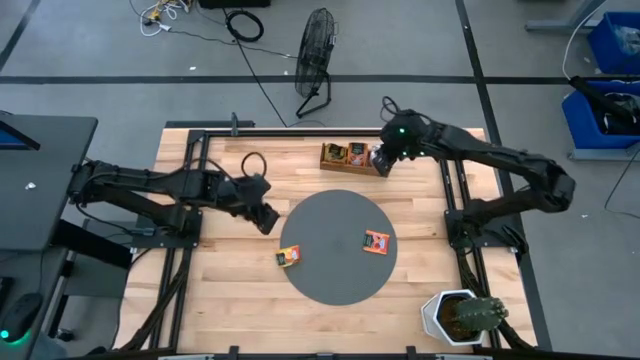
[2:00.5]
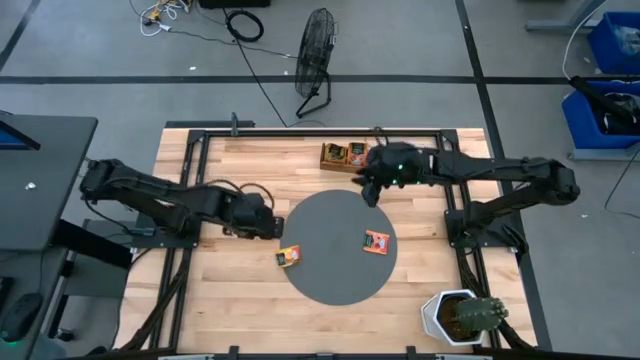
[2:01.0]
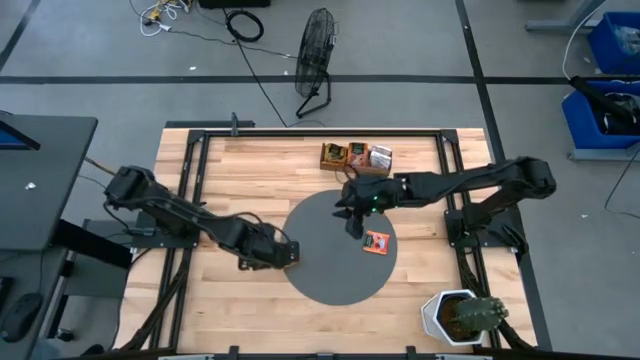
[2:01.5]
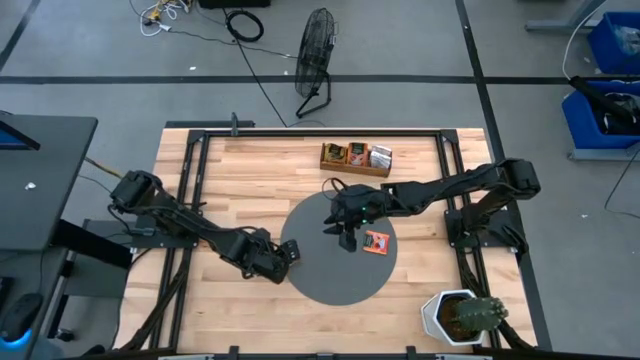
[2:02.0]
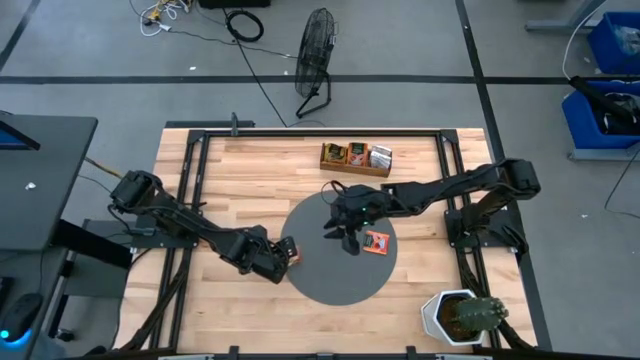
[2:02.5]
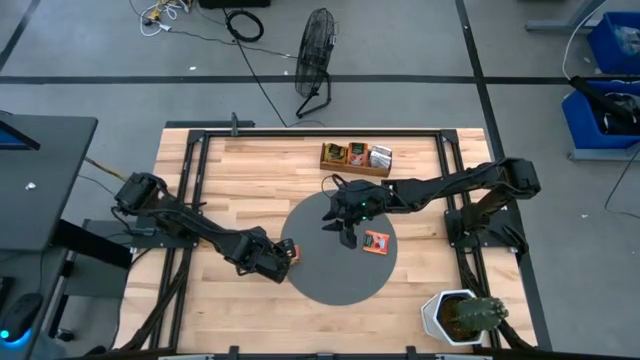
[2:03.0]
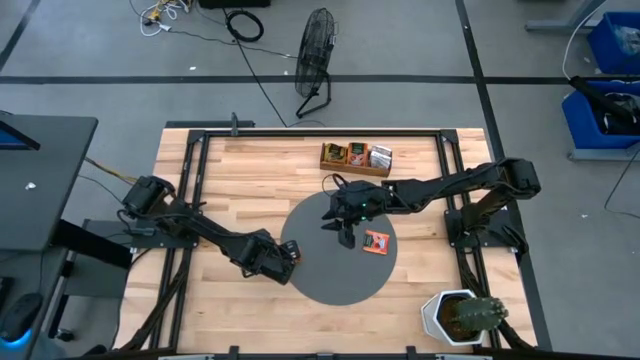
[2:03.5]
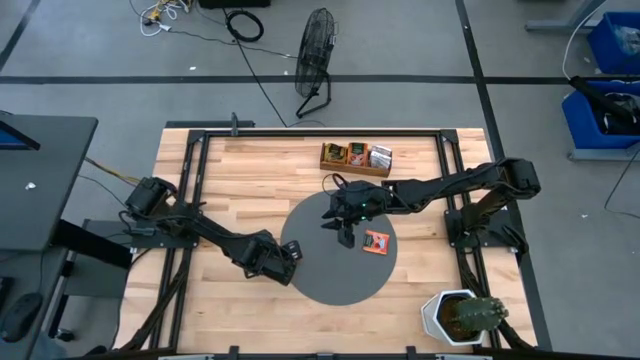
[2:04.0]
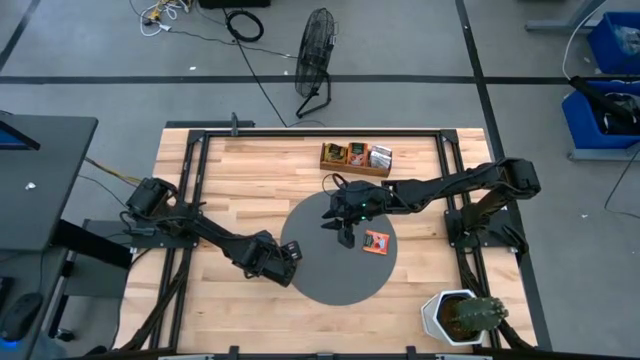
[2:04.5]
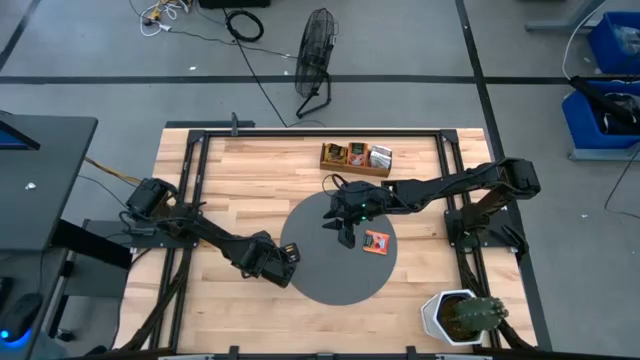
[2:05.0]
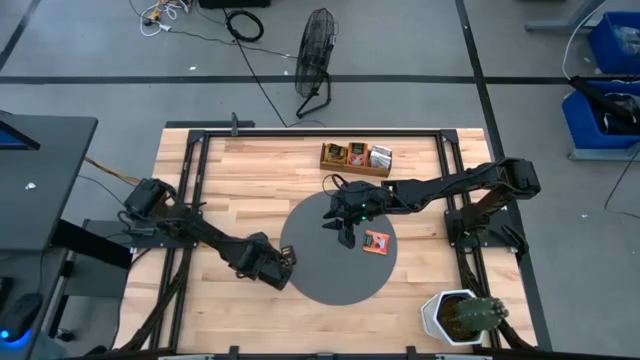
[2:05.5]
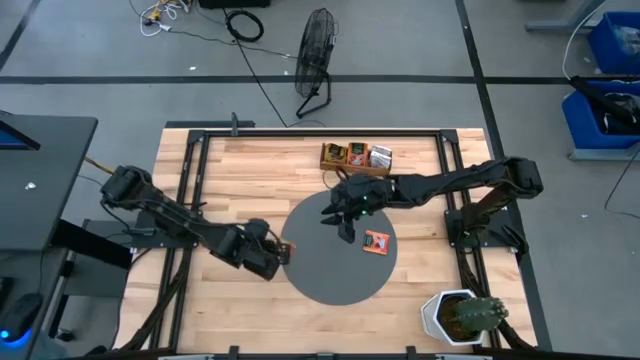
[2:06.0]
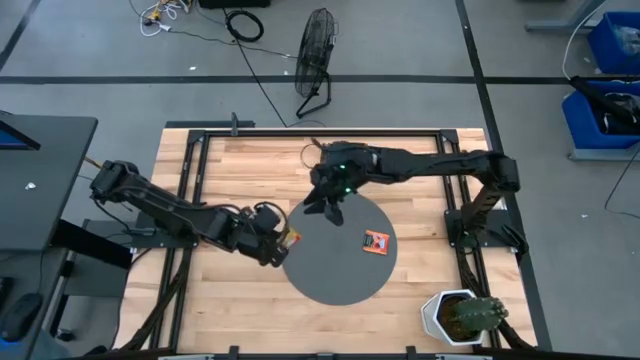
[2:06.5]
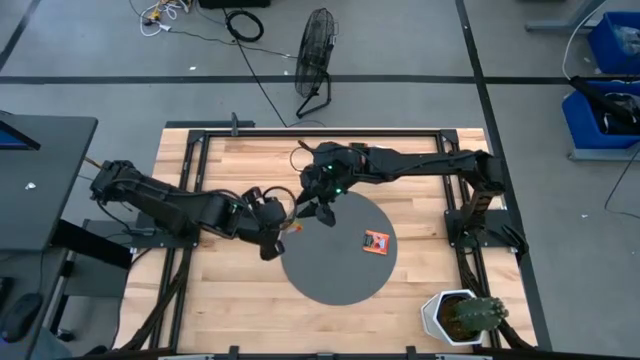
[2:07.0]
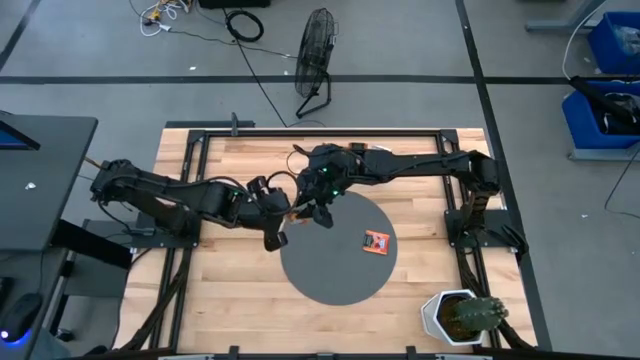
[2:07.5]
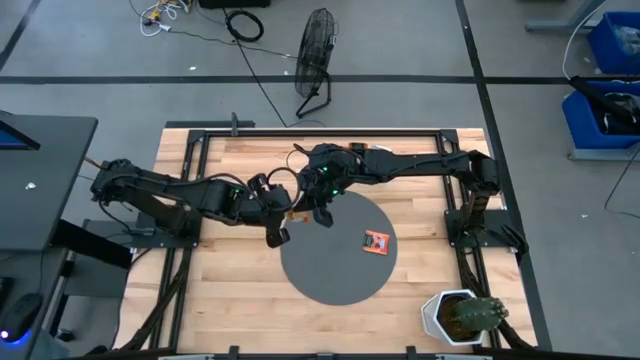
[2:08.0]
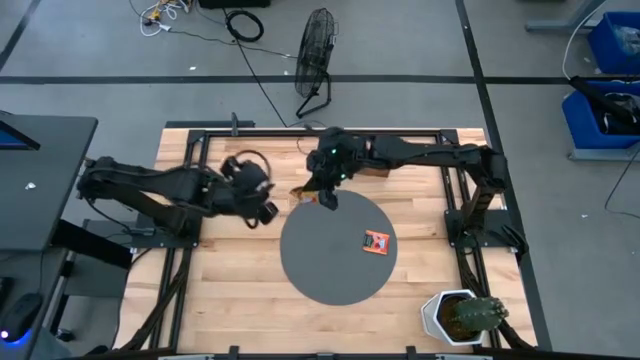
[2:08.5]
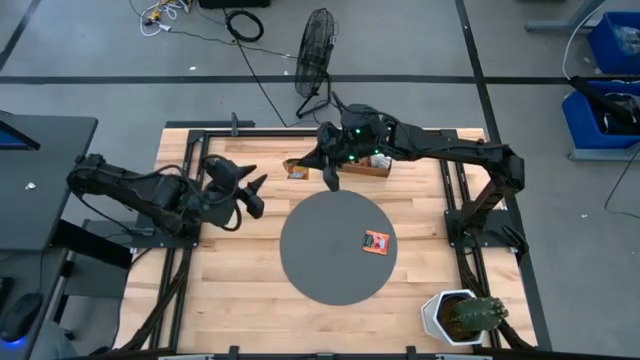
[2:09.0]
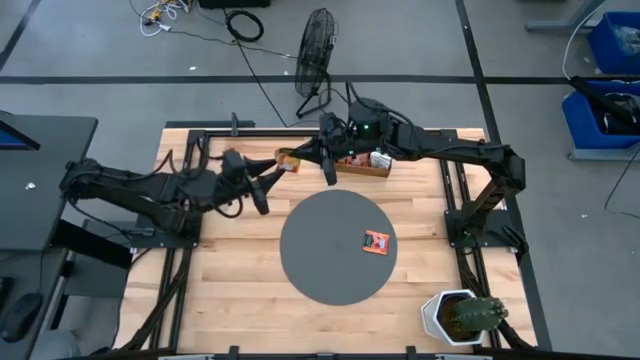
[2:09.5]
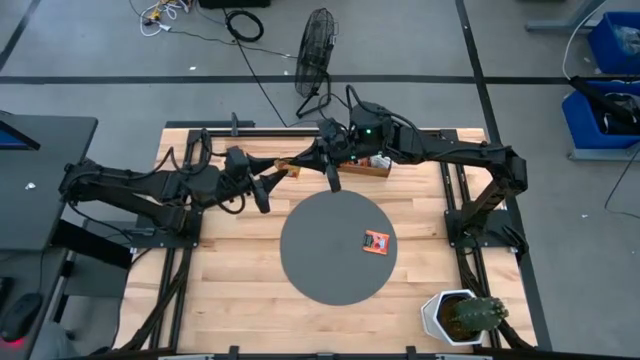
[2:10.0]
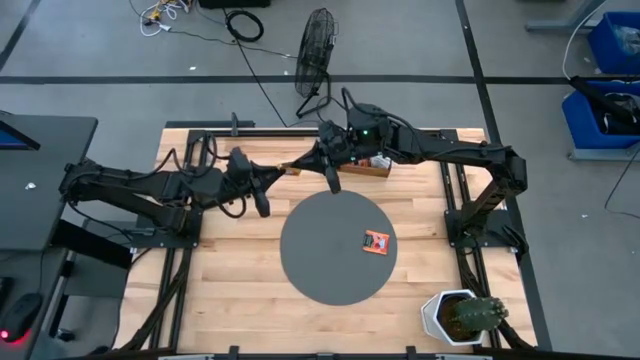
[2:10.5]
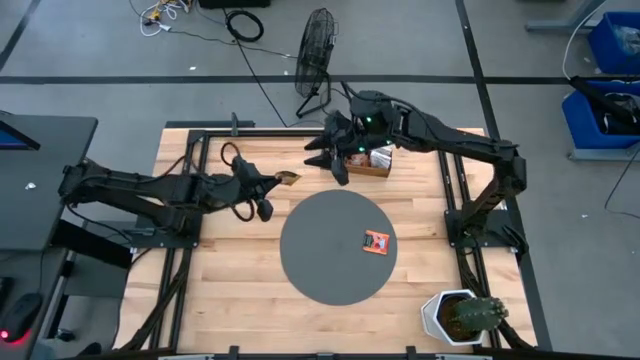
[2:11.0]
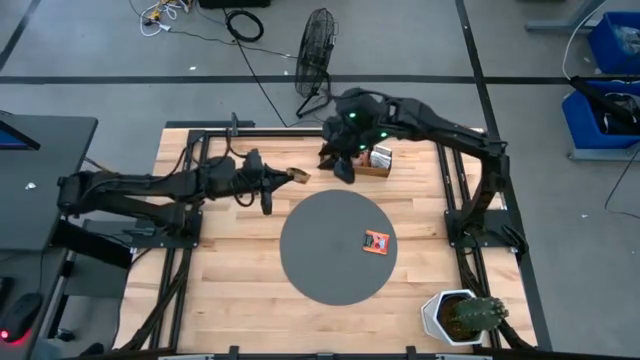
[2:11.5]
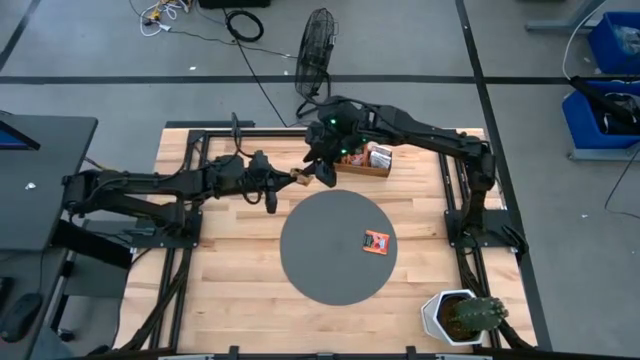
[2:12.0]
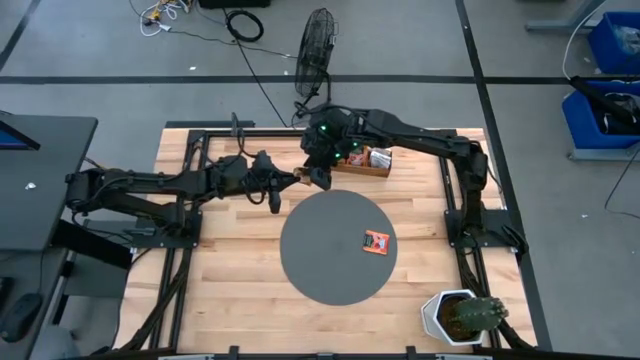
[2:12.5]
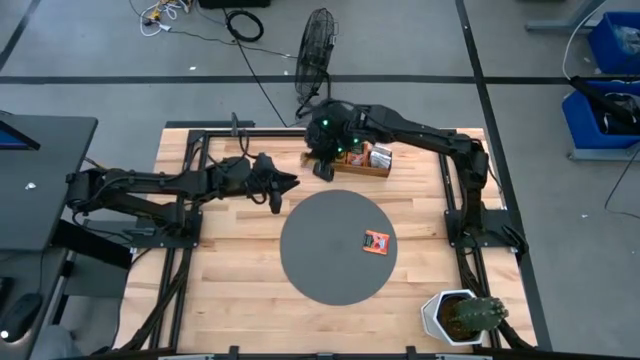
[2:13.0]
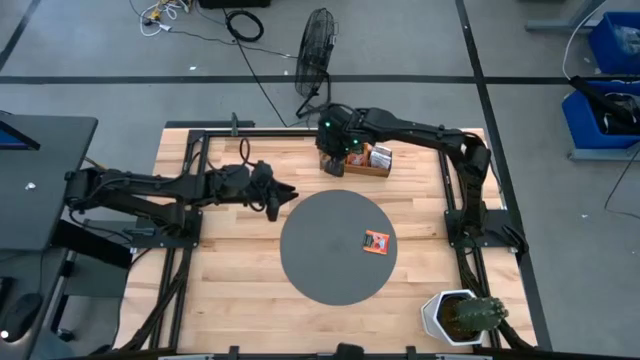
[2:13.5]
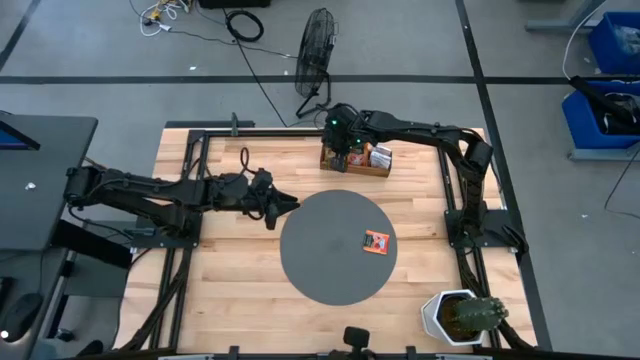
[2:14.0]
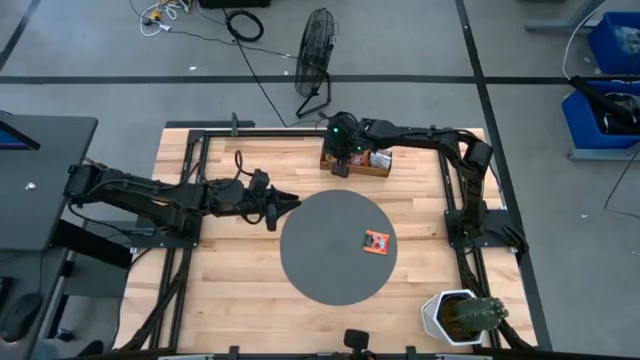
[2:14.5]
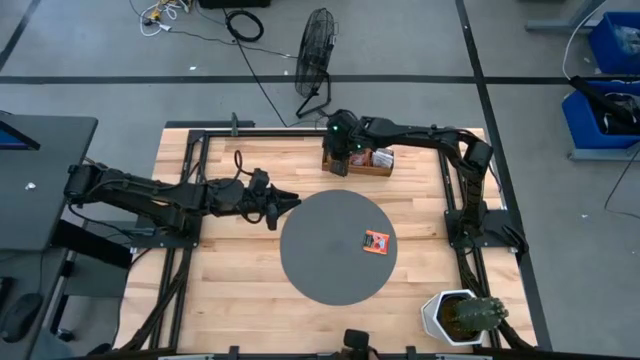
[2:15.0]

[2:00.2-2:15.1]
Task: Pick & Place Tea
Put the yellow tea bag into the left section of the wooden organizer
